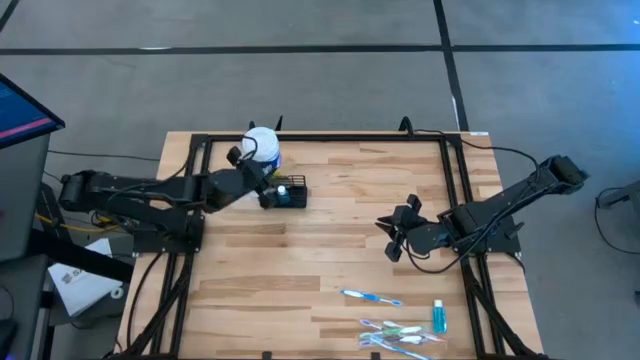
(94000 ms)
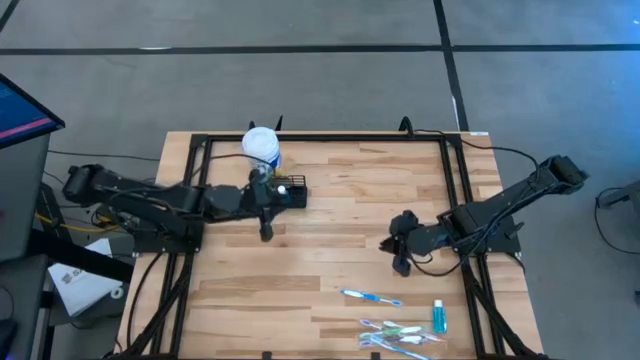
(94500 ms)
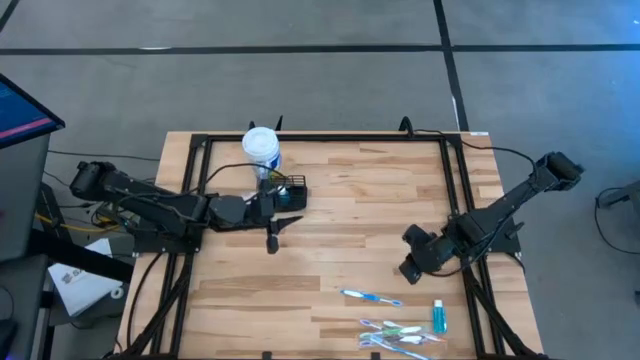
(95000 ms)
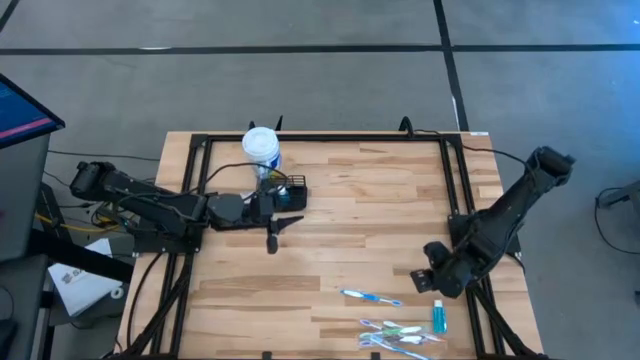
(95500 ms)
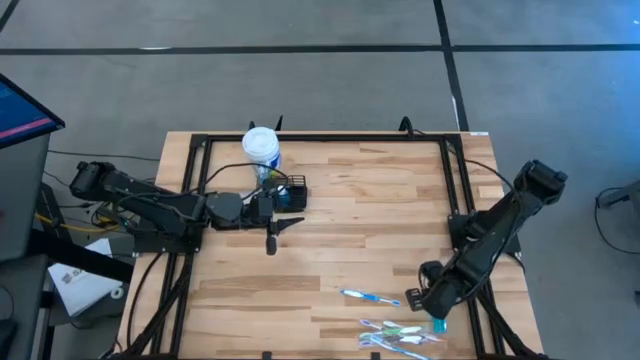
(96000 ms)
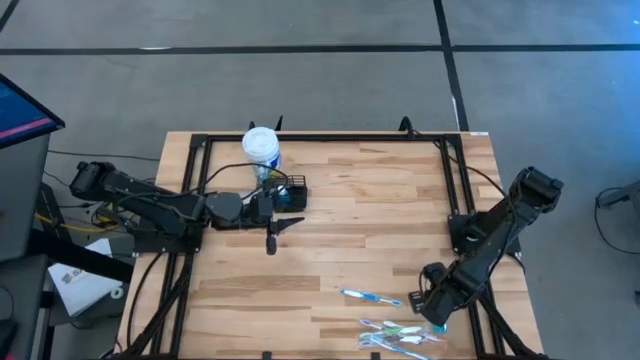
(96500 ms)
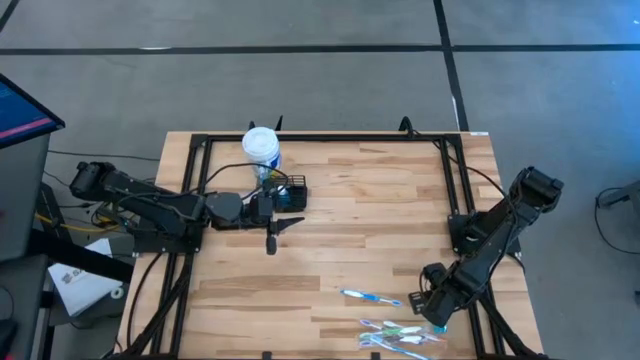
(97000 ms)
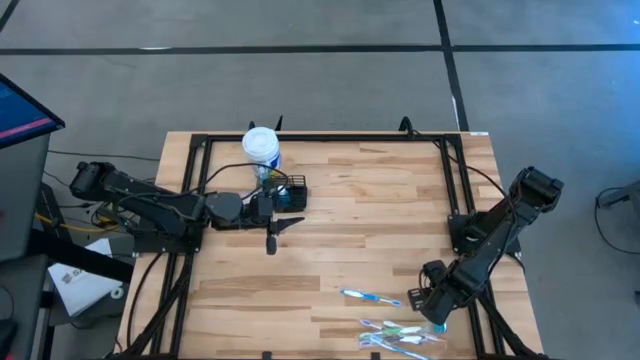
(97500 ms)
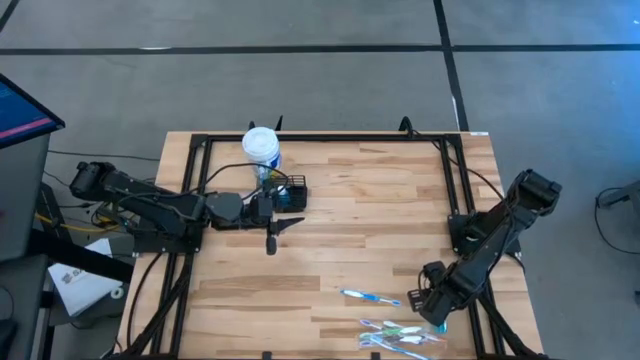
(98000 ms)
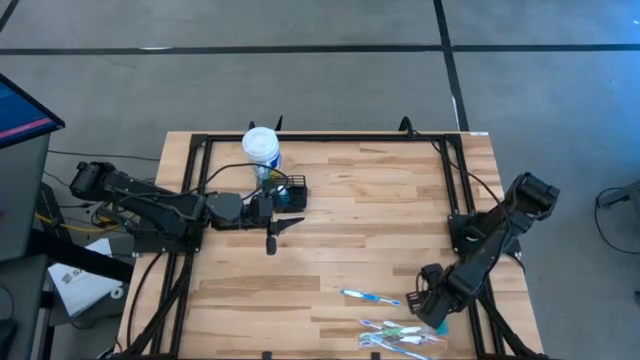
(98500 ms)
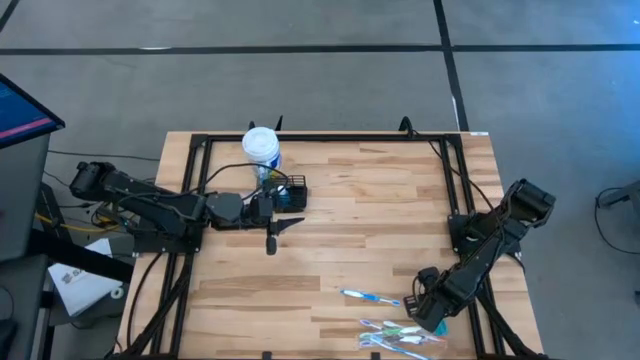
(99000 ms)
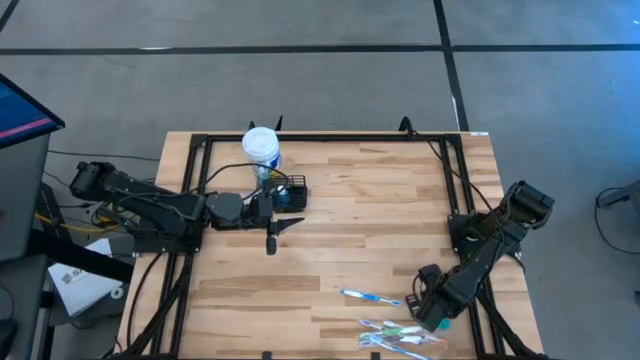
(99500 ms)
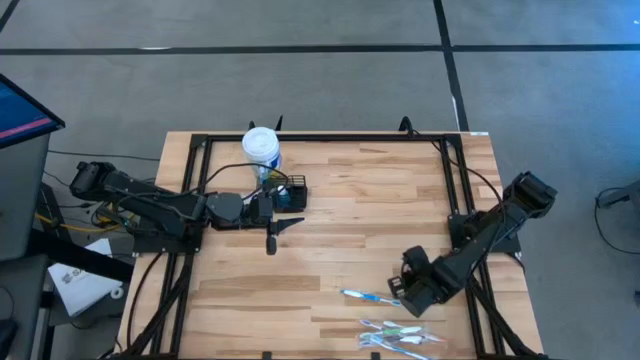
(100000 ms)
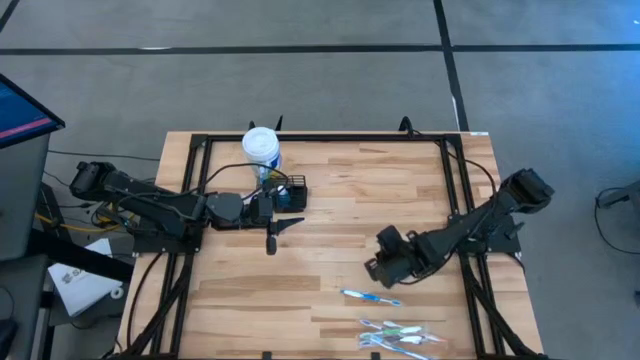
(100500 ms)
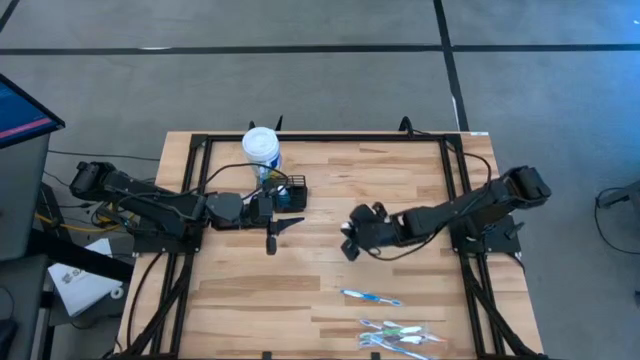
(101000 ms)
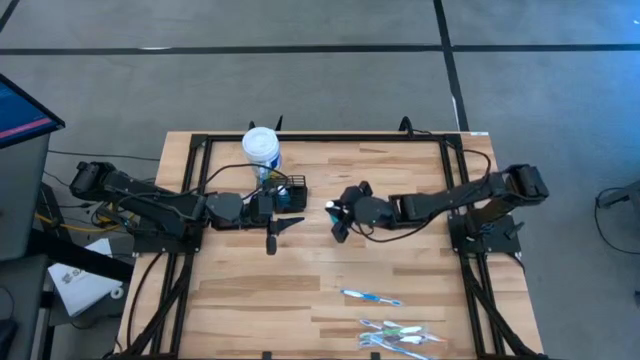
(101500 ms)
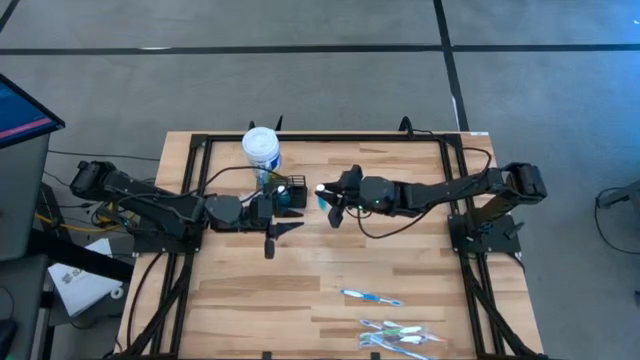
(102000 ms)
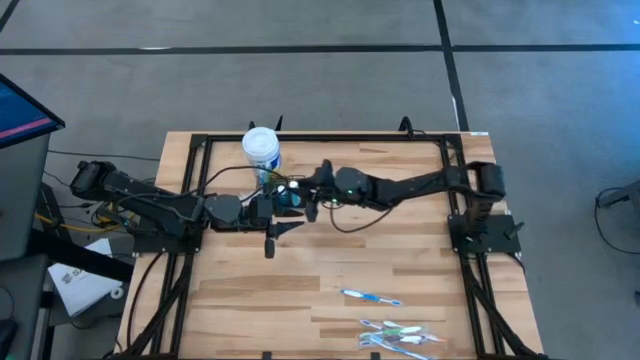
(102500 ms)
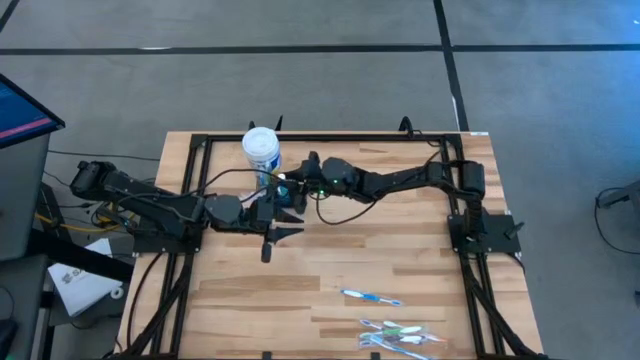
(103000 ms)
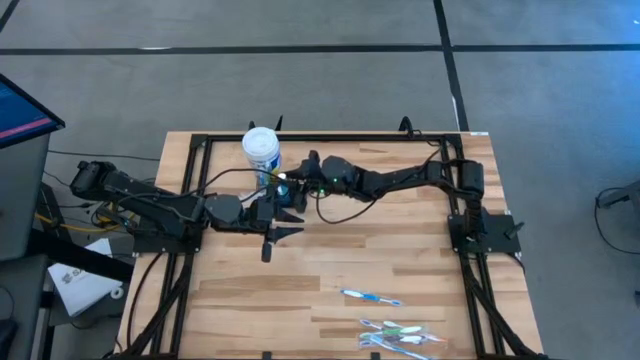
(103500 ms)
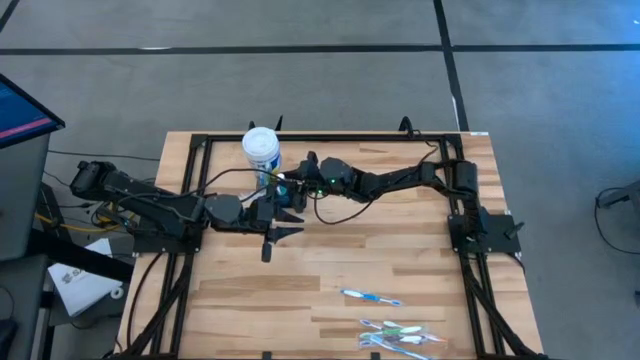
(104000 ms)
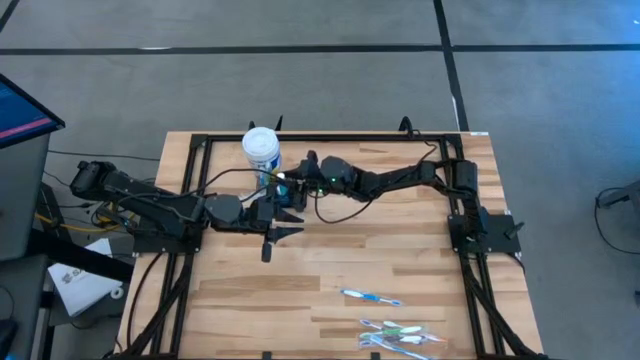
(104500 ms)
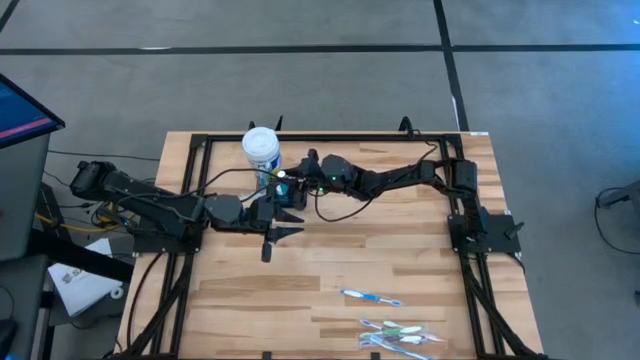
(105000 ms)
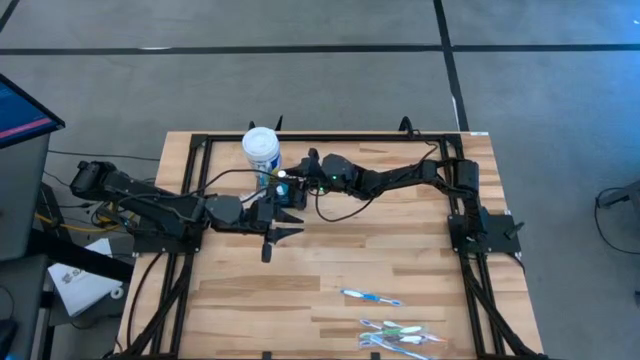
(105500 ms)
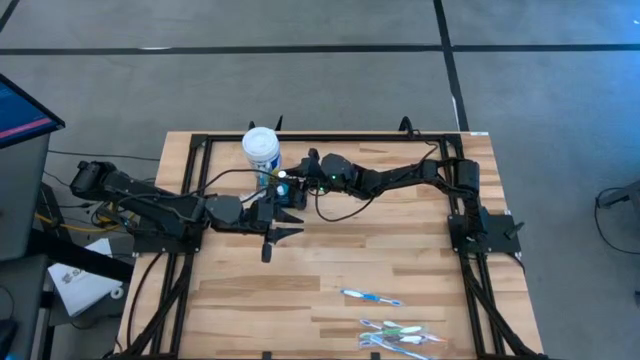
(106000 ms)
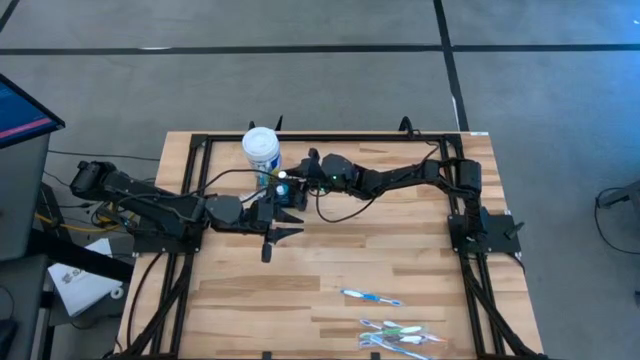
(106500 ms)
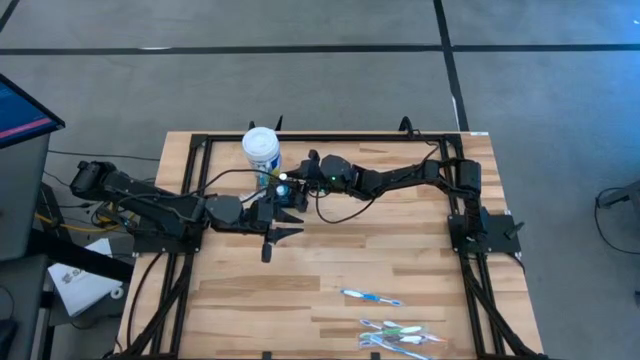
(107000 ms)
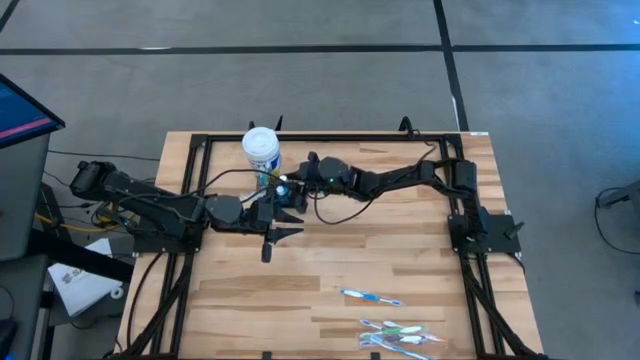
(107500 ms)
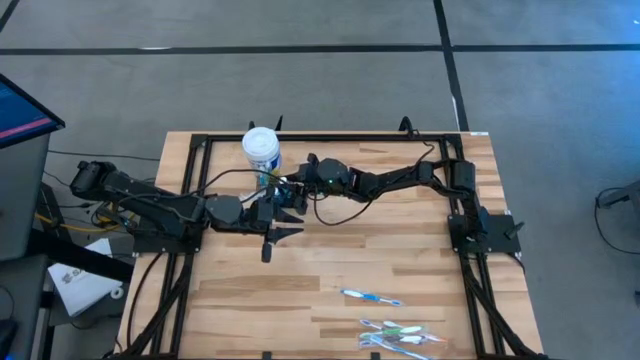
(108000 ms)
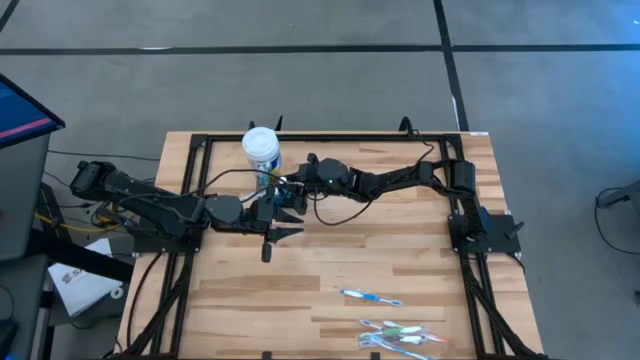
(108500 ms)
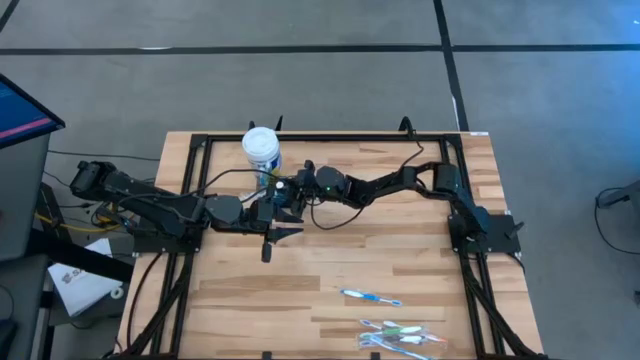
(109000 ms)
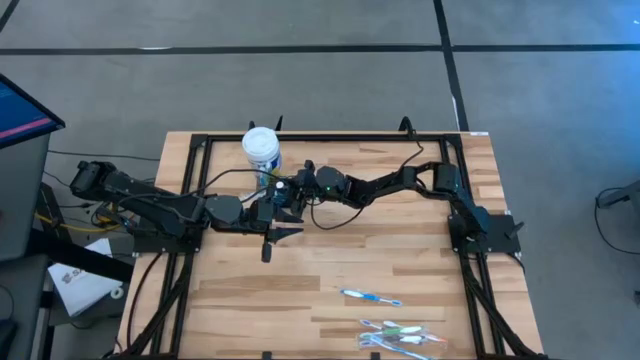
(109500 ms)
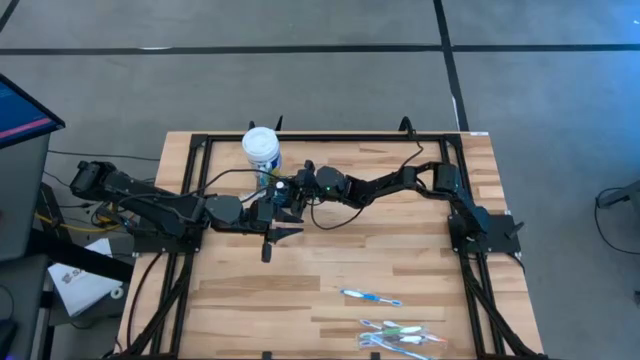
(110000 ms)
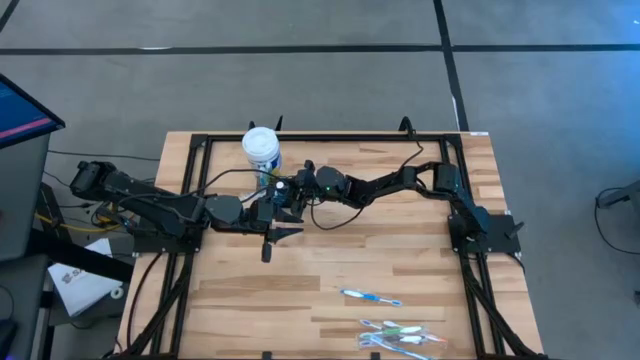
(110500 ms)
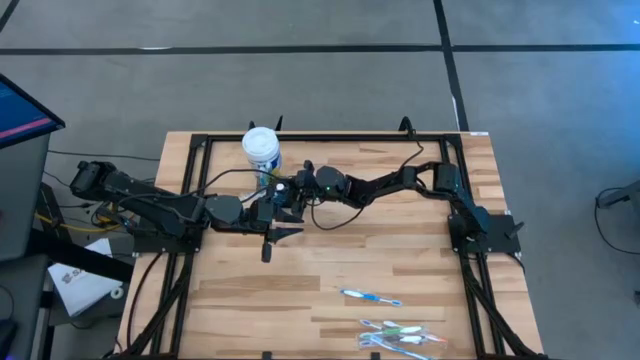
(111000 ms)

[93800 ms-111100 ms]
Task: Pick & Place toothbrushing station
Put the mouthwash bottle into the wire organizer

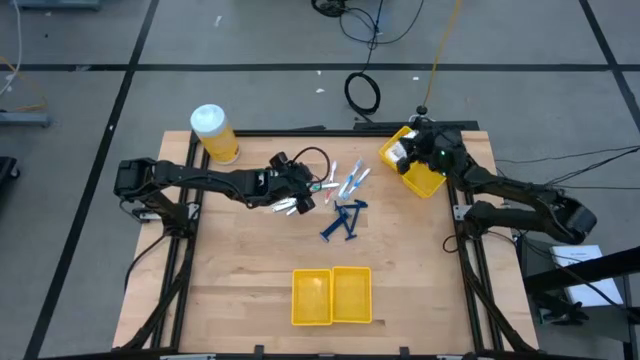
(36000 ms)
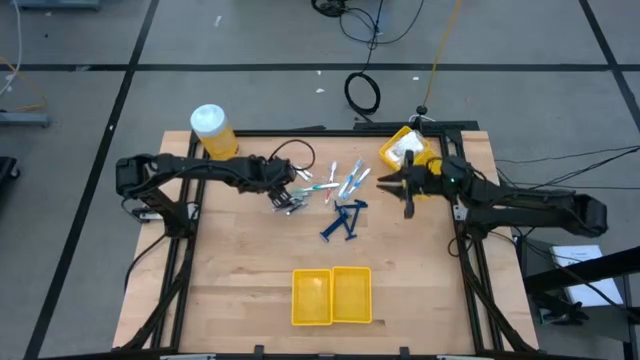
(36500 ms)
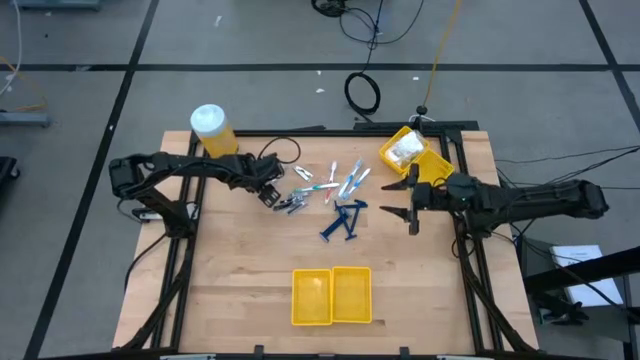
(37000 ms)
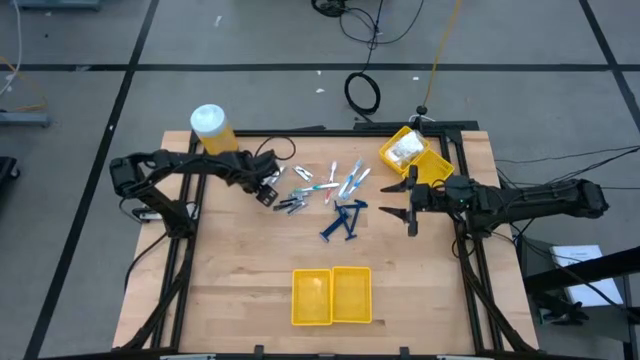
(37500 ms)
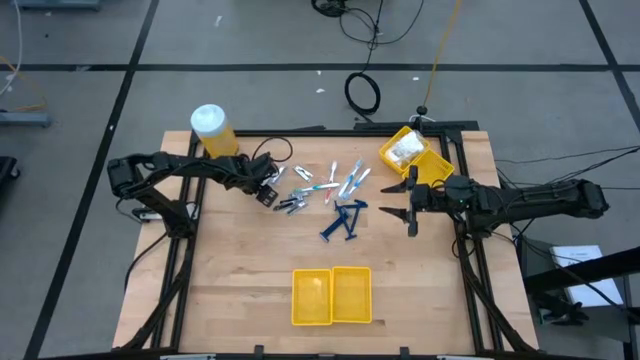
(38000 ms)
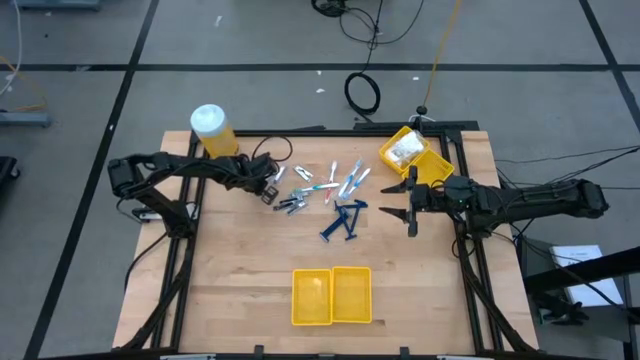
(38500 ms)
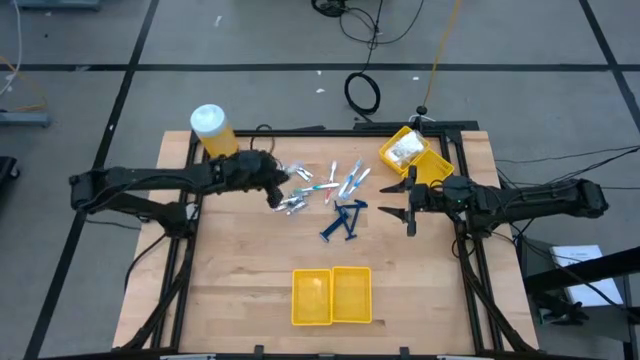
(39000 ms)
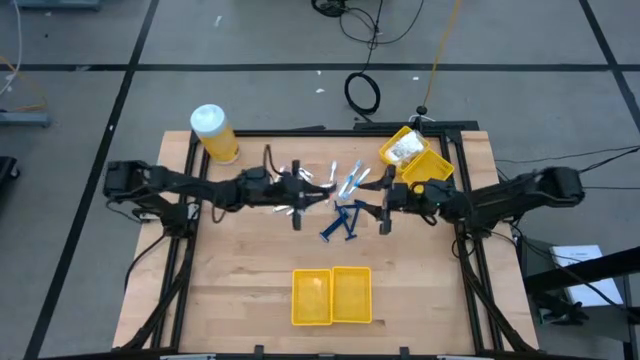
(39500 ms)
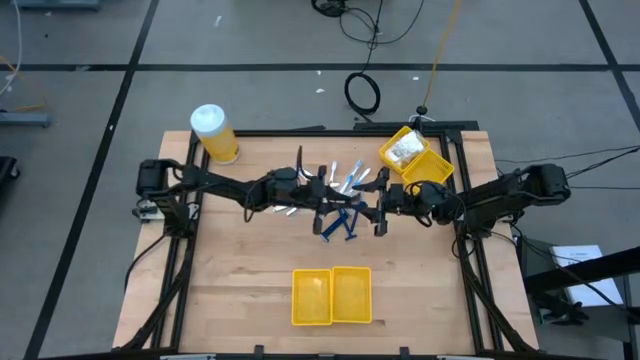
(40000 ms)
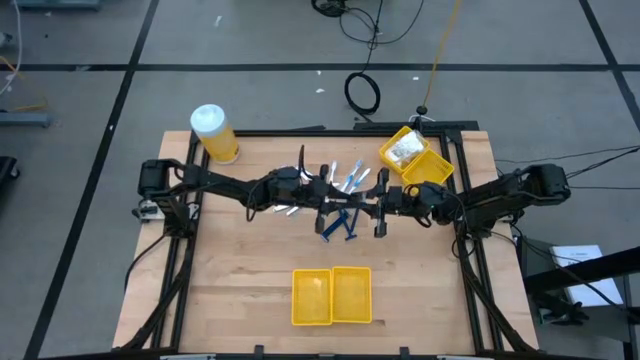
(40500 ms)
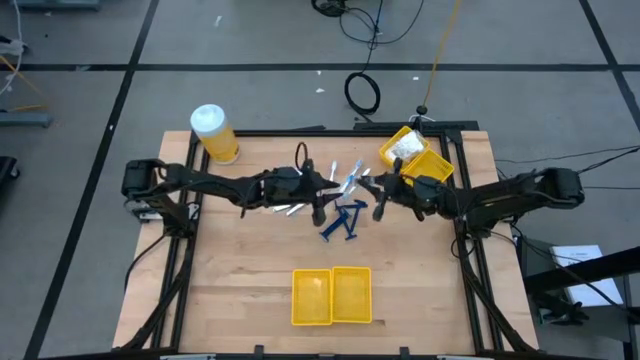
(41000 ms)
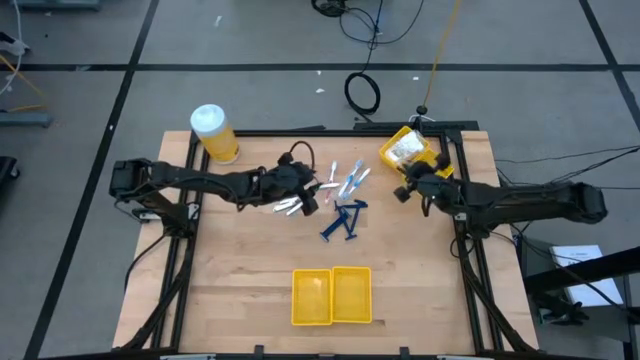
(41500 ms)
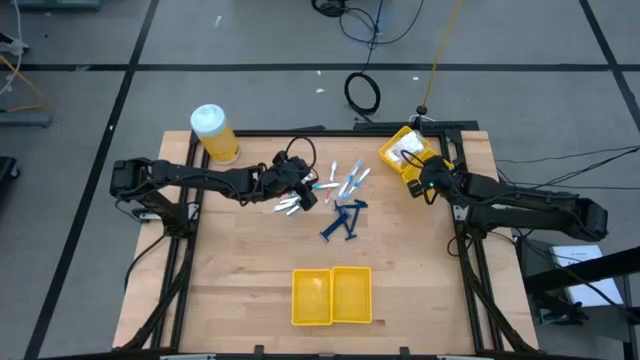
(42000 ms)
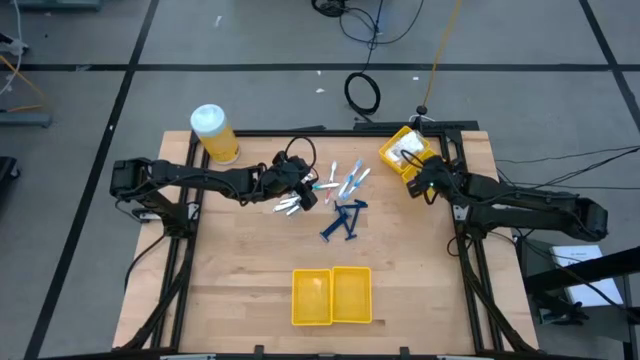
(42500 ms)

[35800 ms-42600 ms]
Task: Pick & Place Travel size toiletries
Put the silver nail cutter into the top right yellow bin
